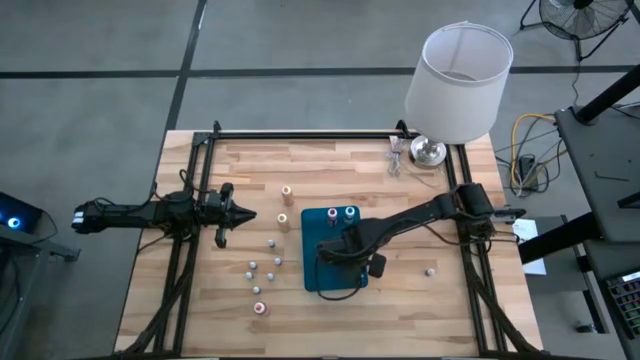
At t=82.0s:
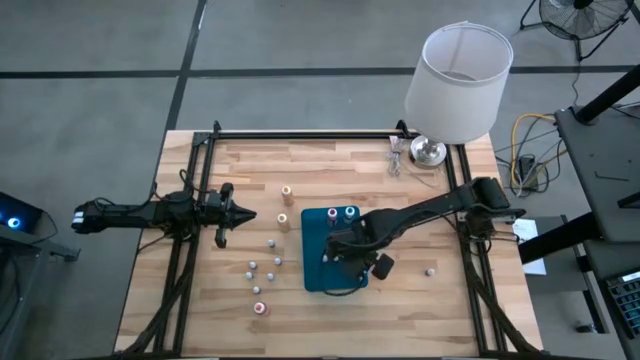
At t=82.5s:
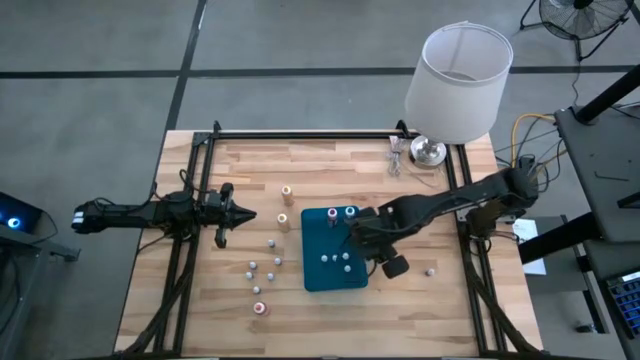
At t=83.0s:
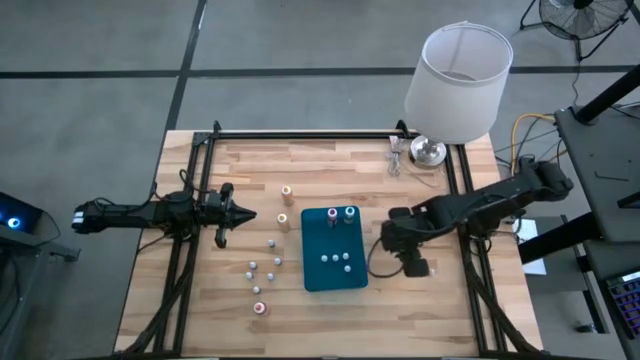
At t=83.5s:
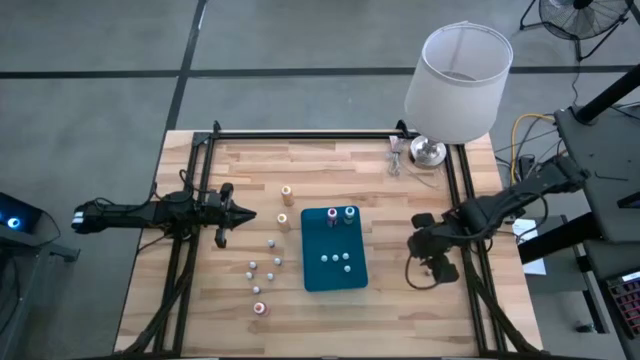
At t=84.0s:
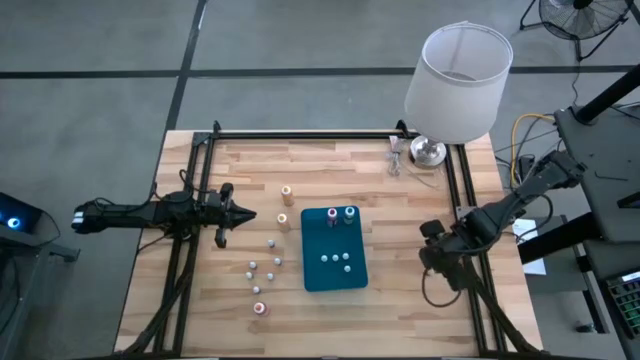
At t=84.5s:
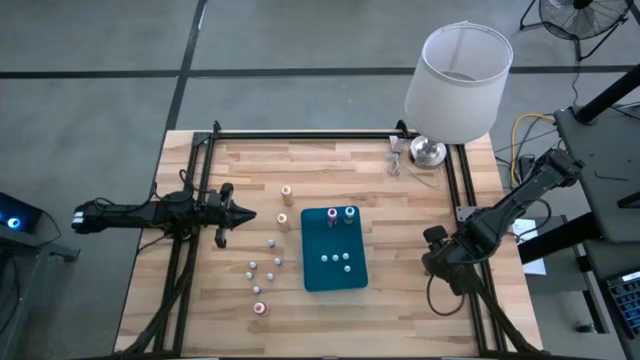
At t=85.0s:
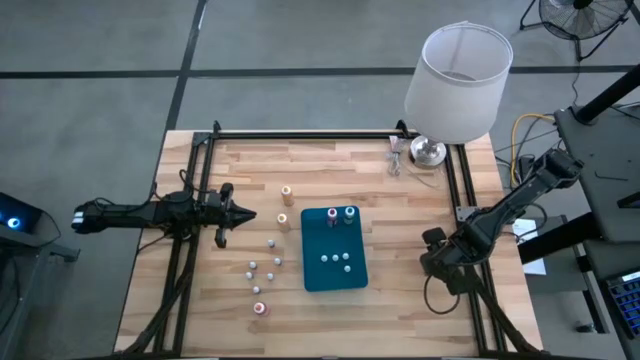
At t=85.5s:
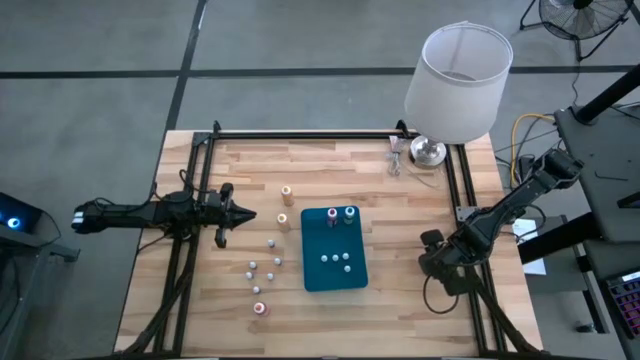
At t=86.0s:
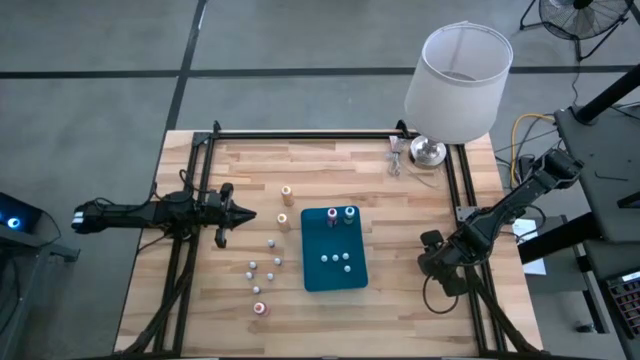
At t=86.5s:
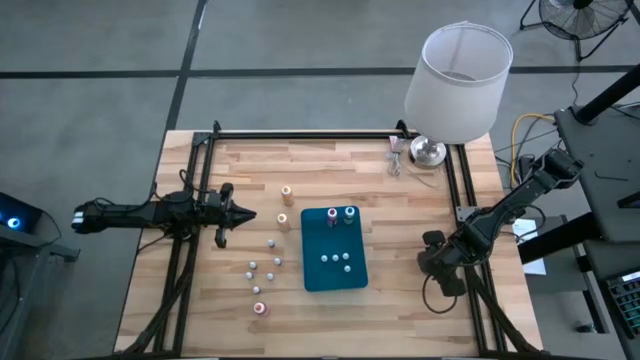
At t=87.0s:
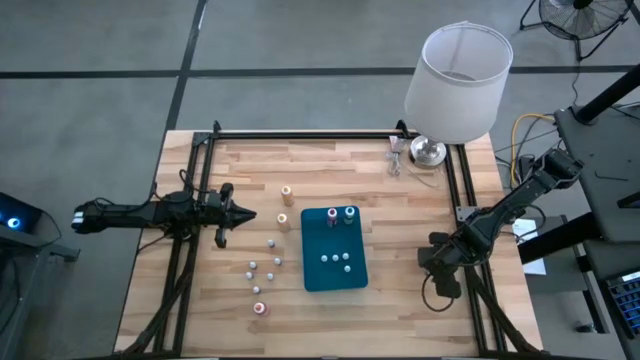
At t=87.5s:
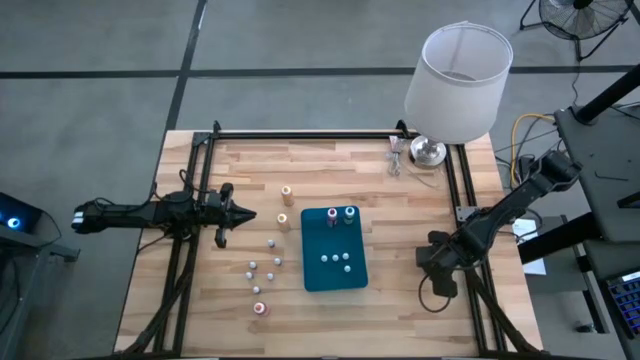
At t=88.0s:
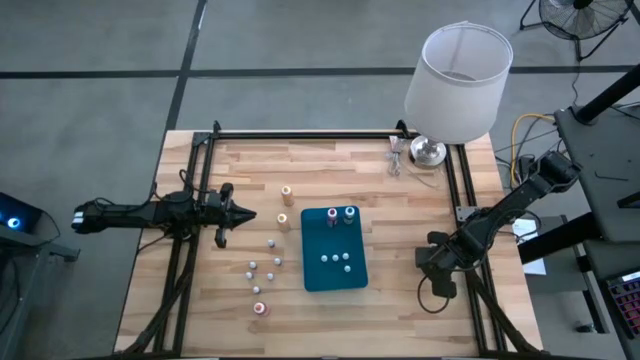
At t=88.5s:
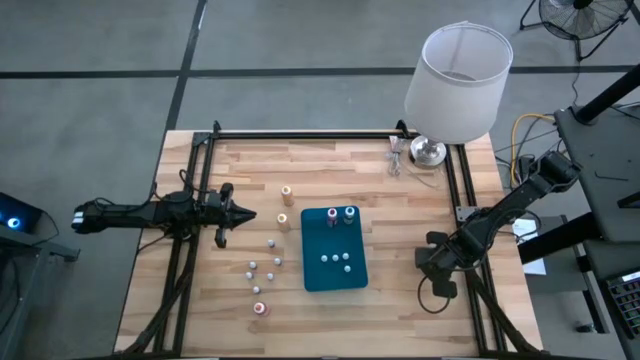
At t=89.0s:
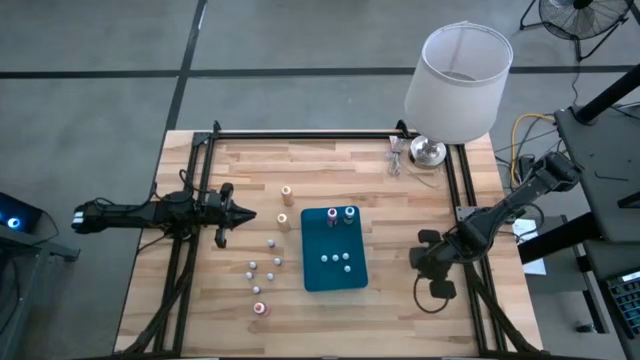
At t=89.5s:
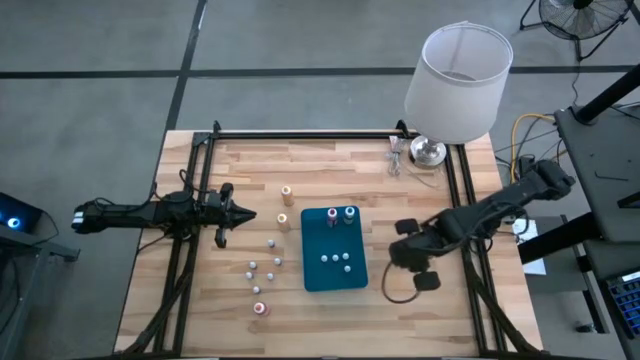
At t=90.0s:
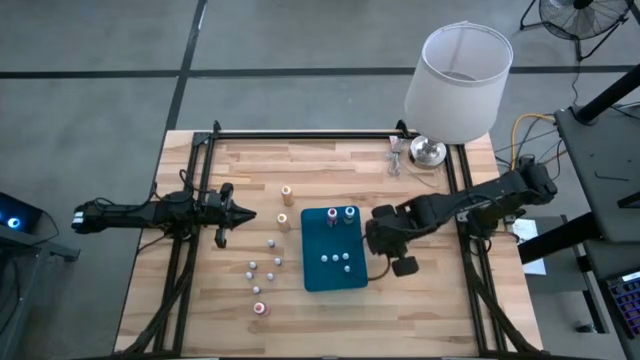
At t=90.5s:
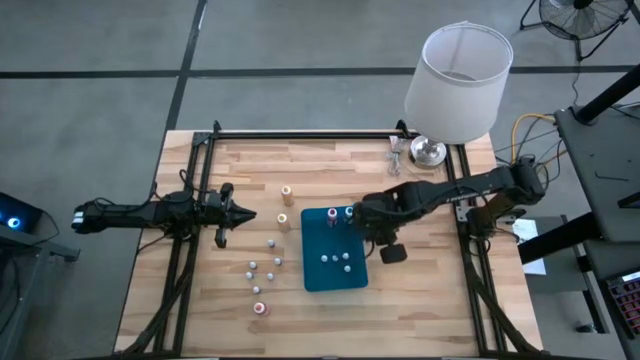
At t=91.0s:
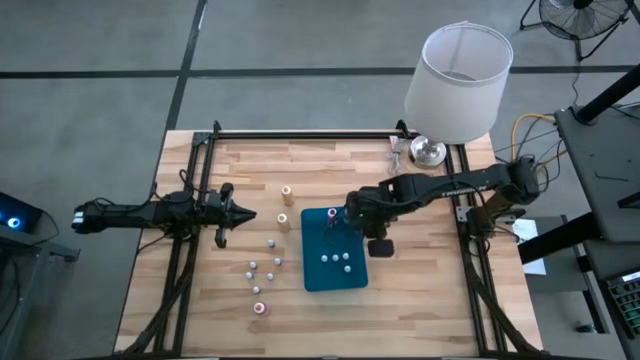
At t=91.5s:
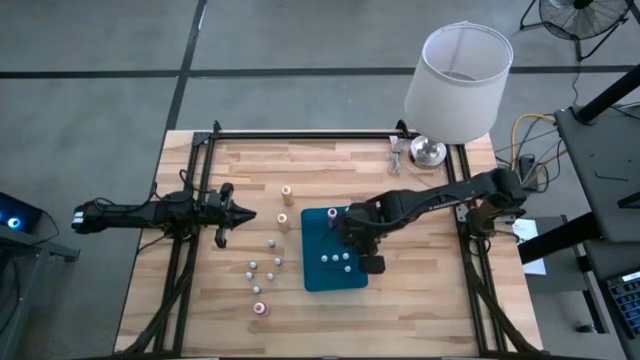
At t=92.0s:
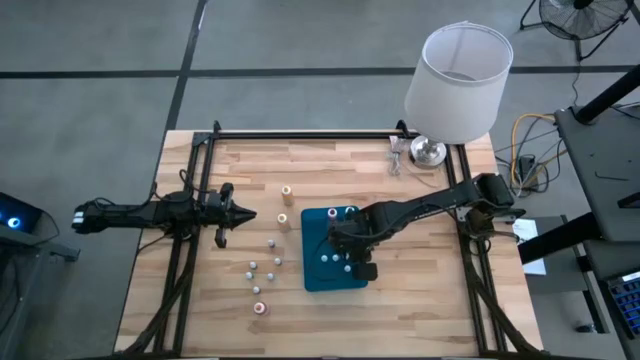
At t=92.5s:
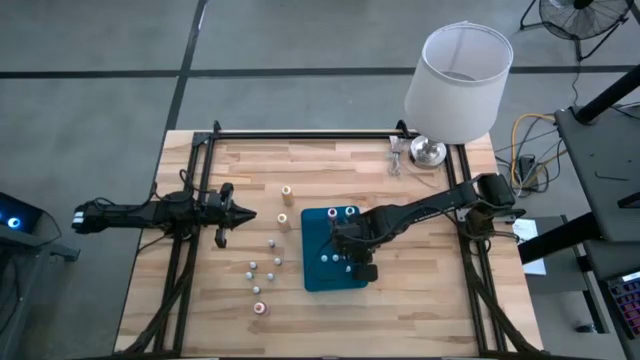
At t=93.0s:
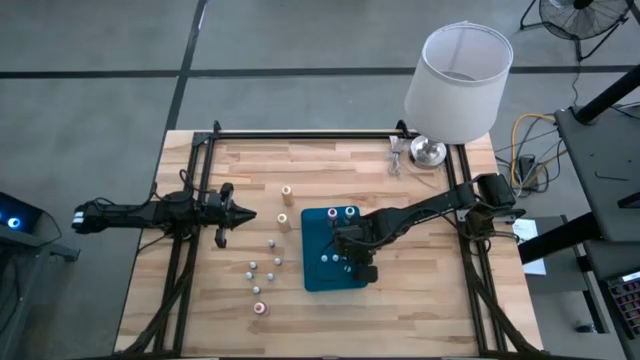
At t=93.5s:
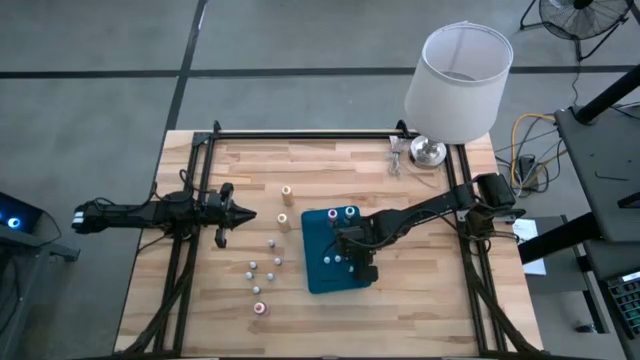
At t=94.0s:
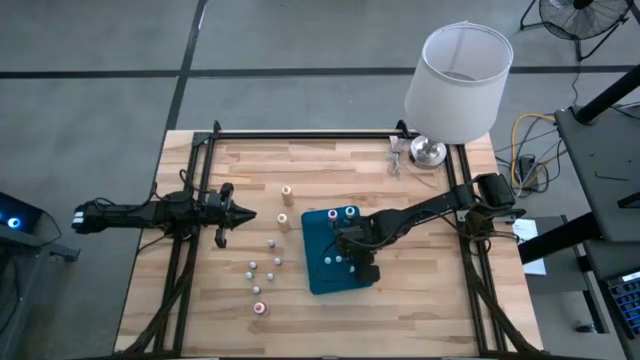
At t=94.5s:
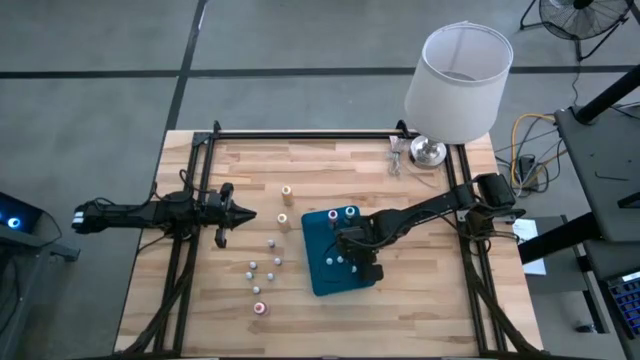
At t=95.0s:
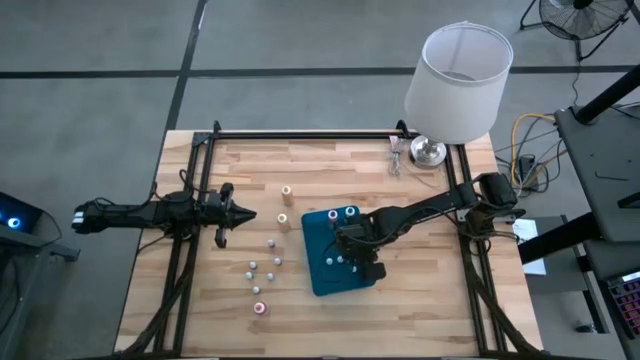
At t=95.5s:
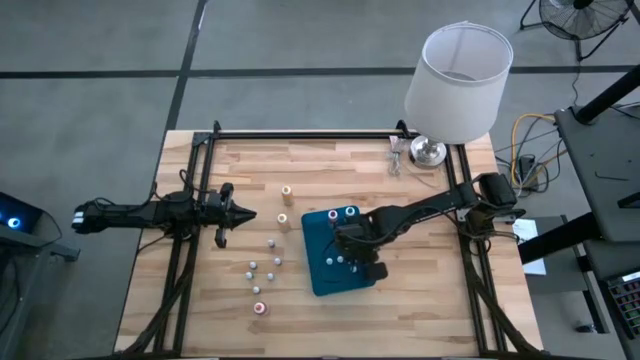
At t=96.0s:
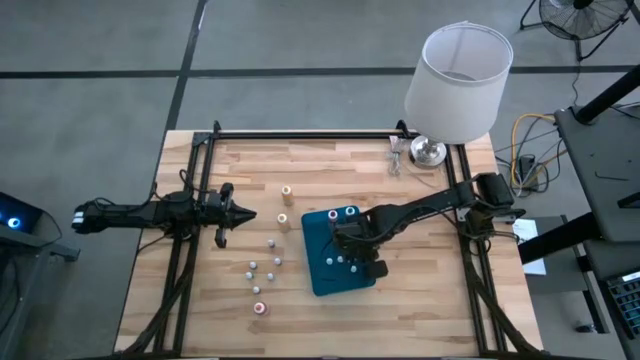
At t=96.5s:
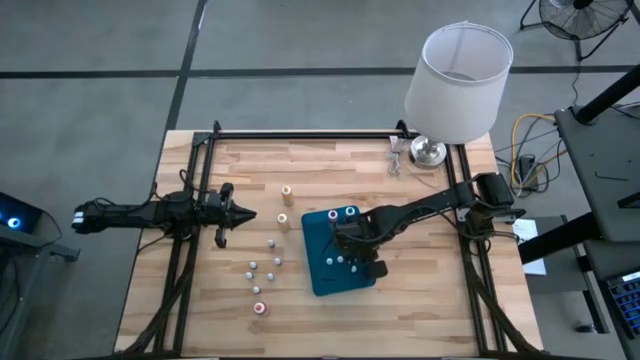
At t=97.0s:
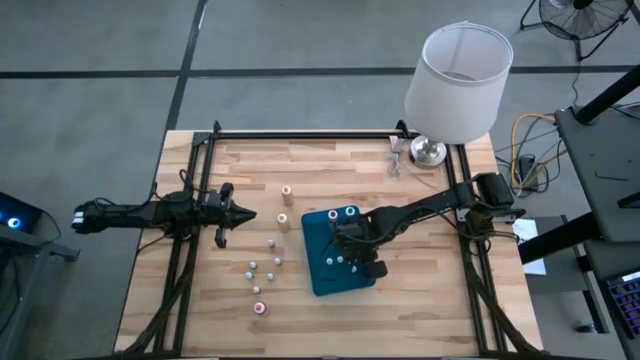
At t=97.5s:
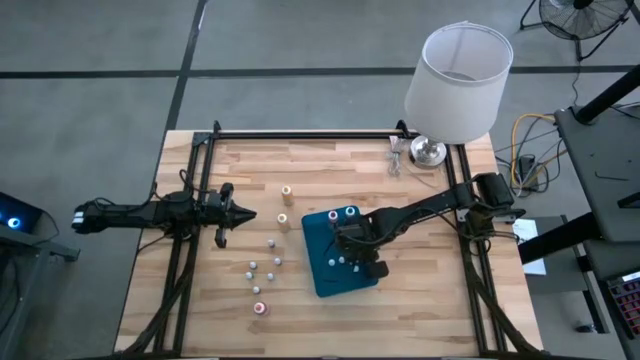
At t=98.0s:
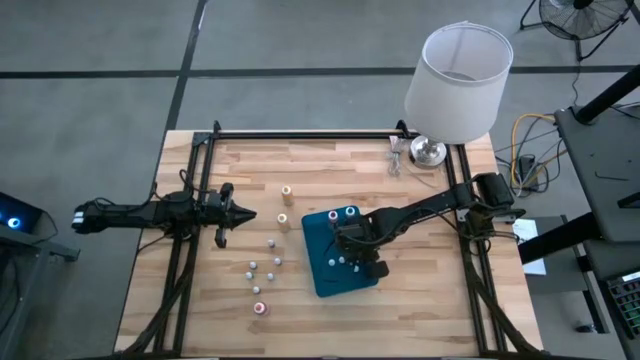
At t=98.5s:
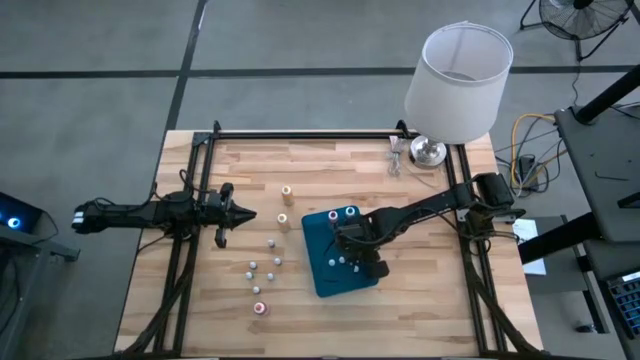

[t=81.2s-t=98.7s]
Task: Pick & Place food coloring
Put the bottom right small red food coloring bottle into the blue bin
